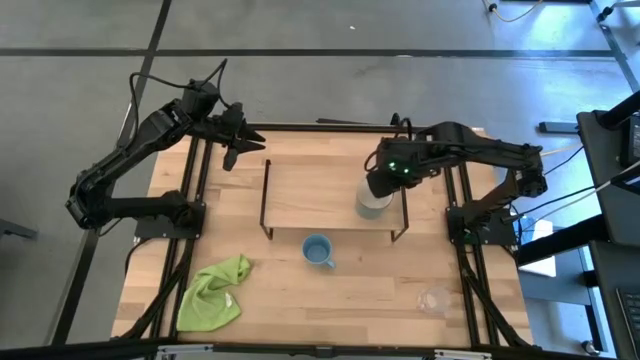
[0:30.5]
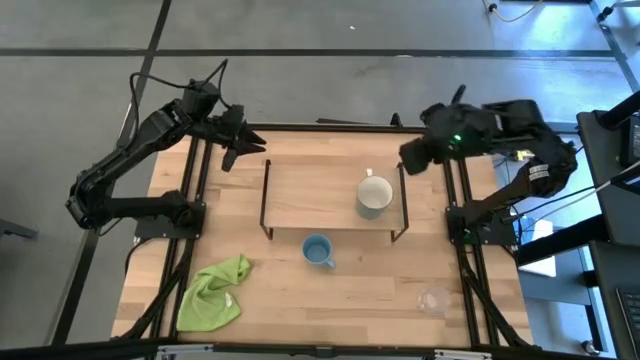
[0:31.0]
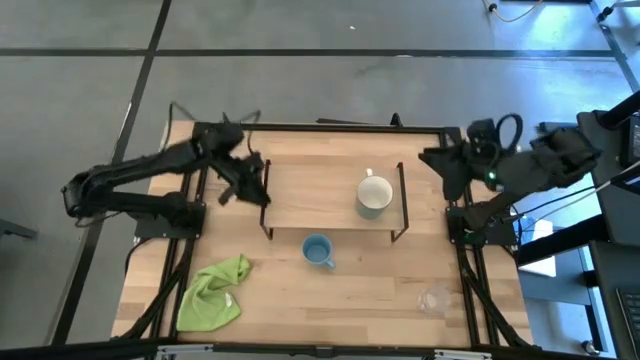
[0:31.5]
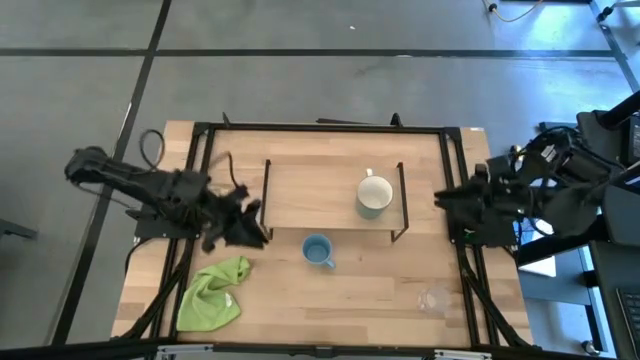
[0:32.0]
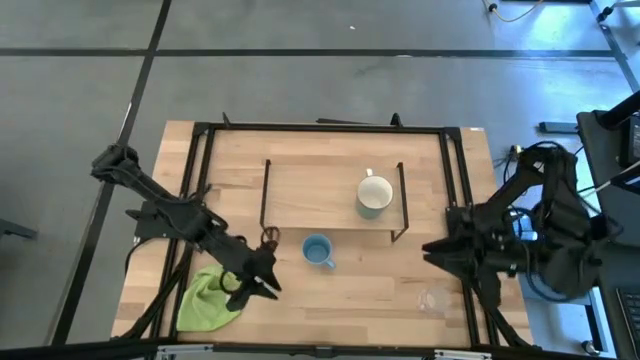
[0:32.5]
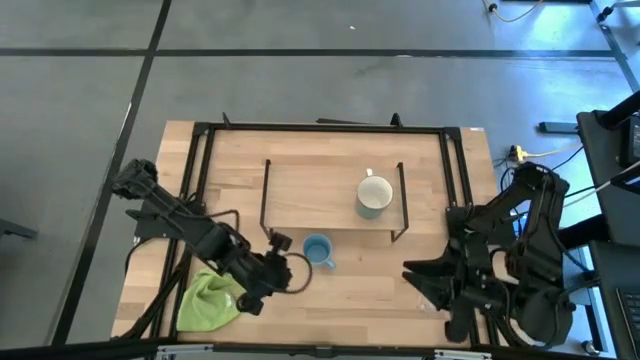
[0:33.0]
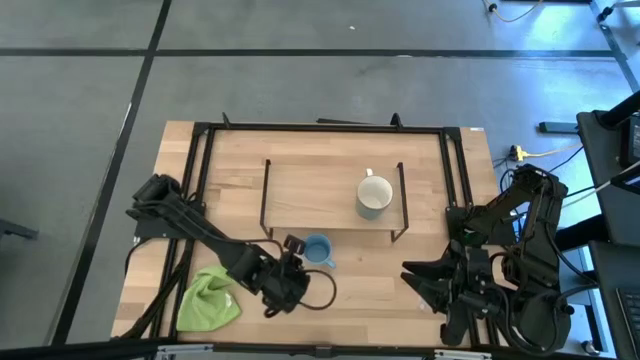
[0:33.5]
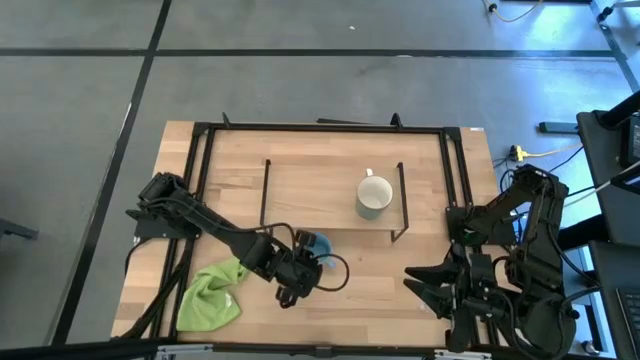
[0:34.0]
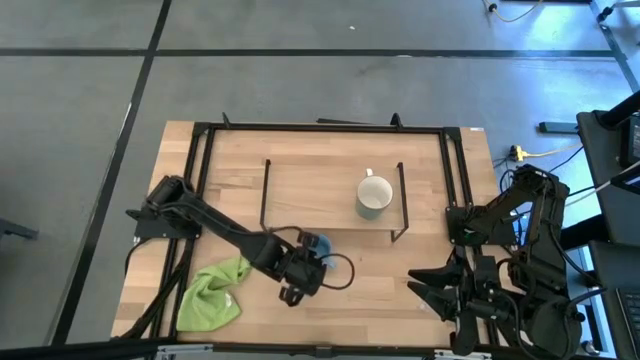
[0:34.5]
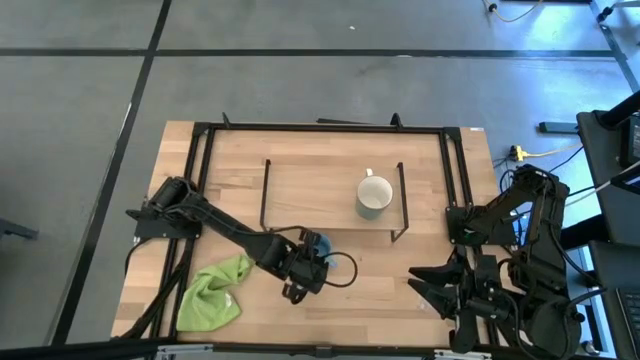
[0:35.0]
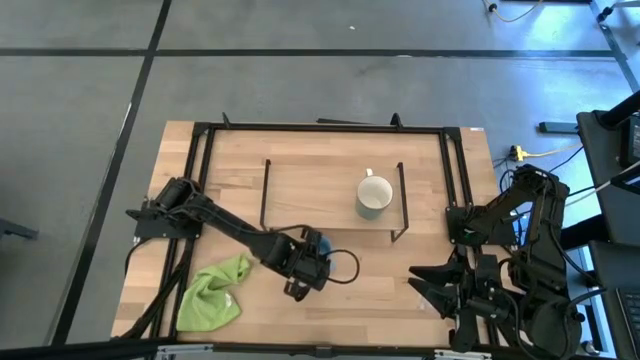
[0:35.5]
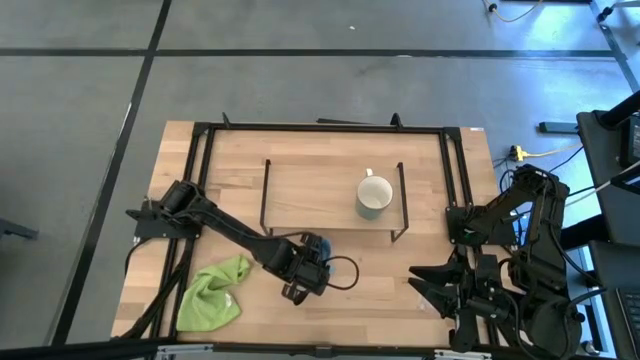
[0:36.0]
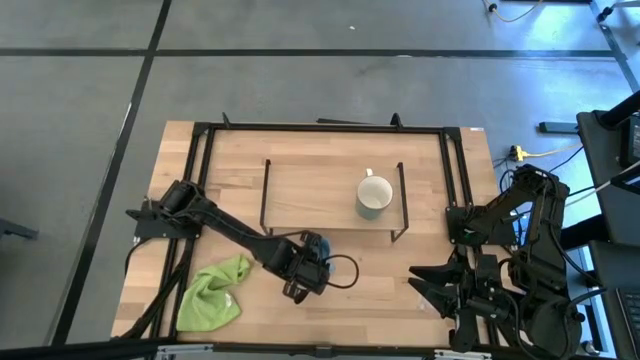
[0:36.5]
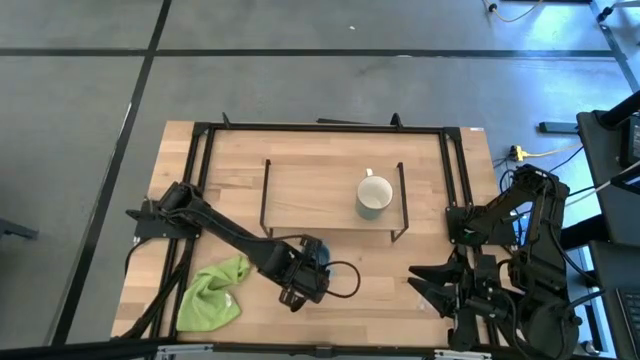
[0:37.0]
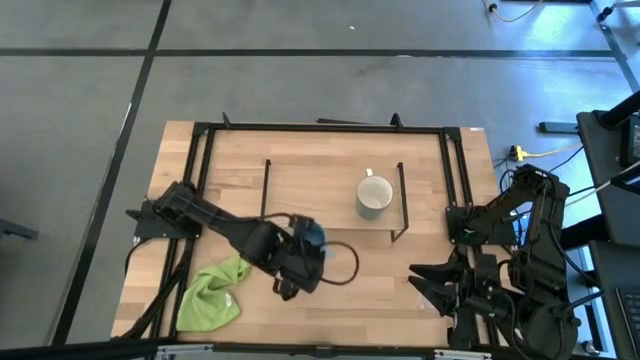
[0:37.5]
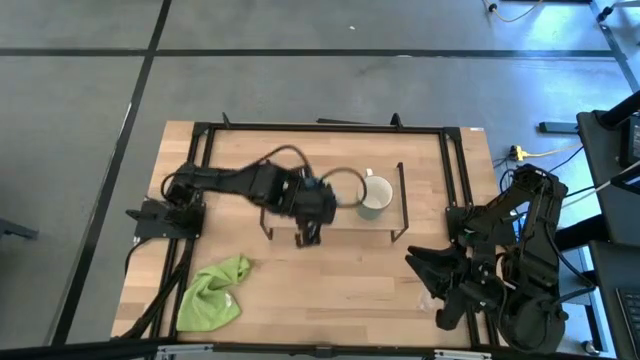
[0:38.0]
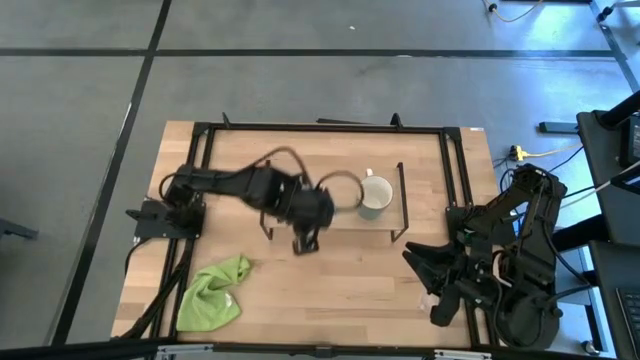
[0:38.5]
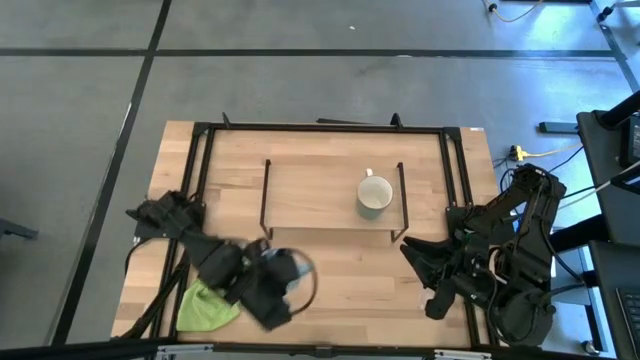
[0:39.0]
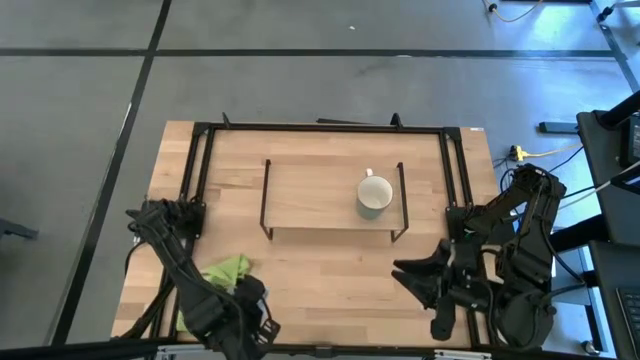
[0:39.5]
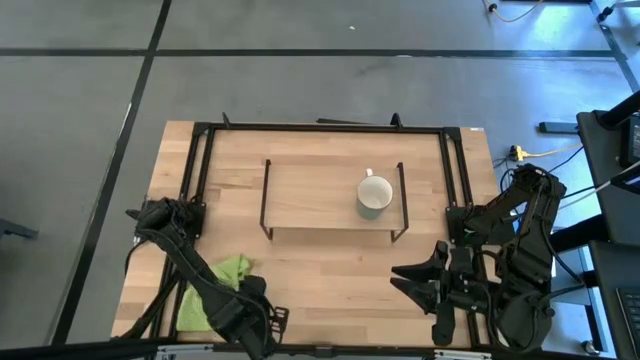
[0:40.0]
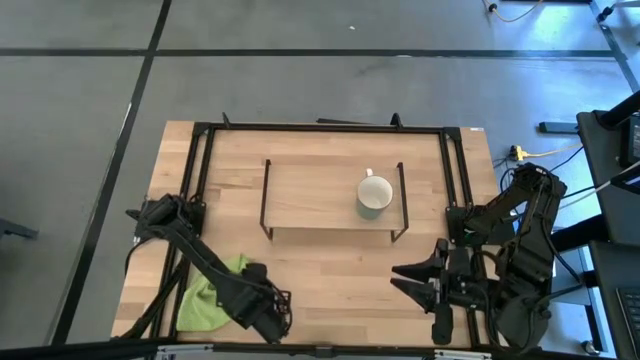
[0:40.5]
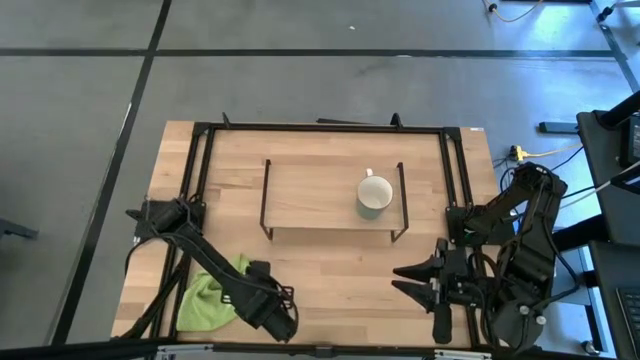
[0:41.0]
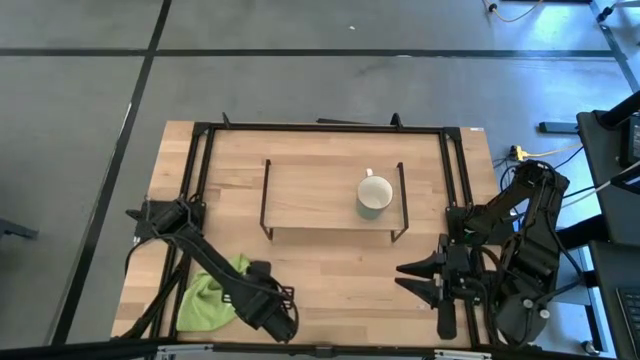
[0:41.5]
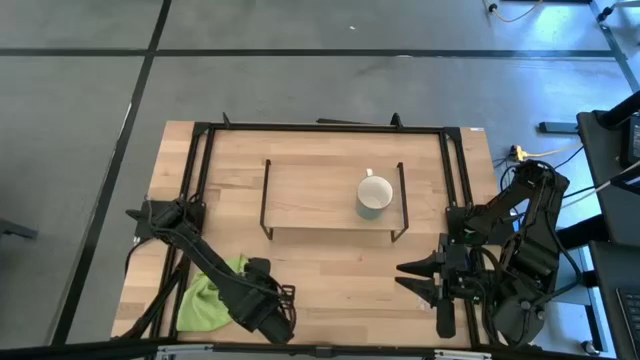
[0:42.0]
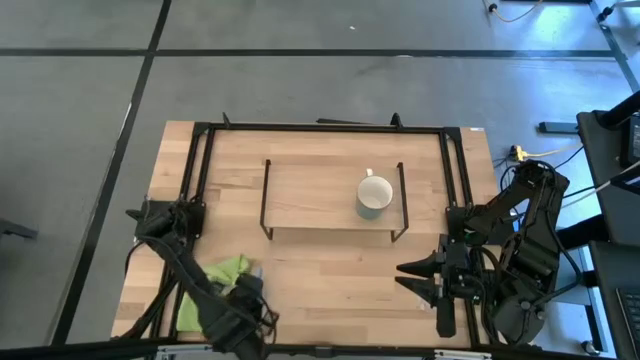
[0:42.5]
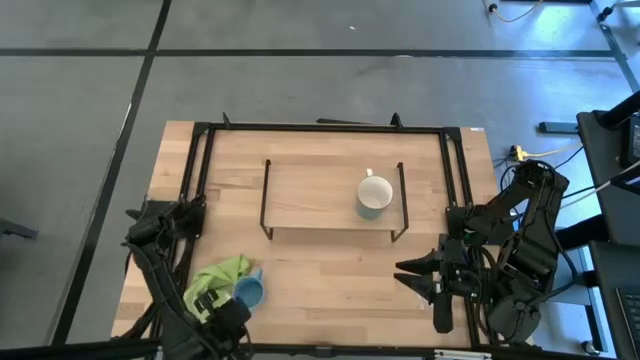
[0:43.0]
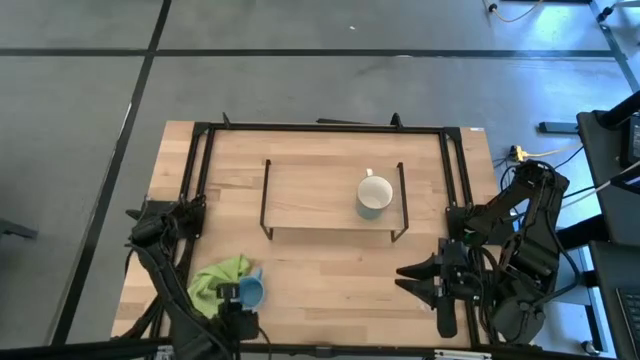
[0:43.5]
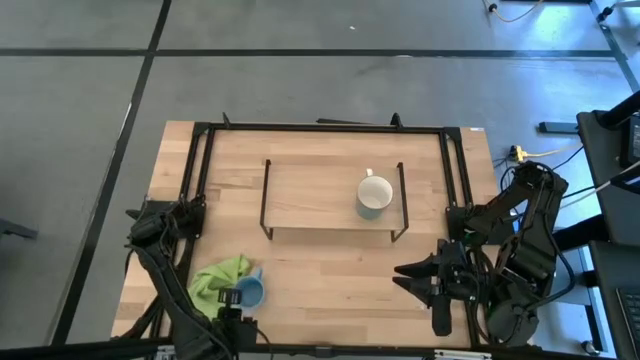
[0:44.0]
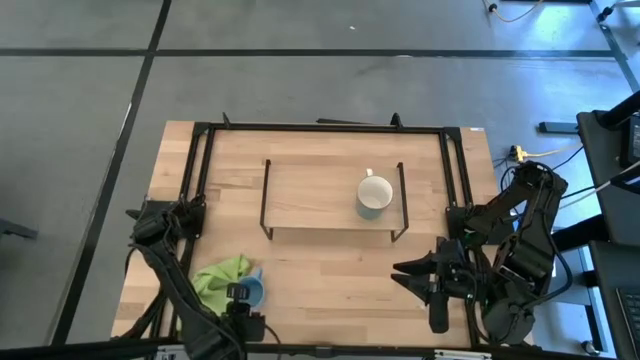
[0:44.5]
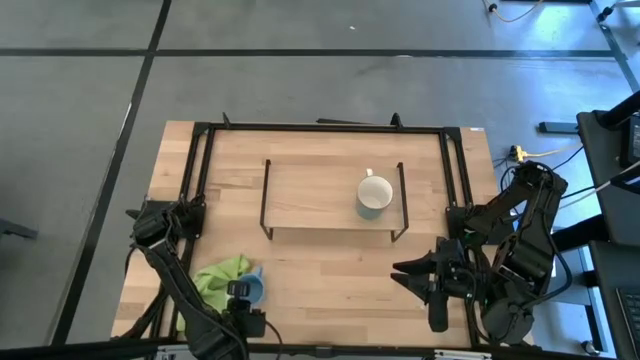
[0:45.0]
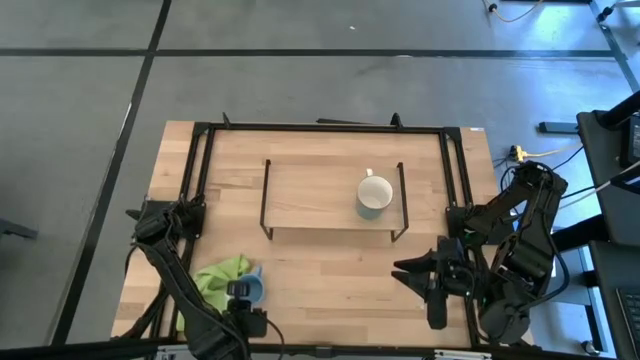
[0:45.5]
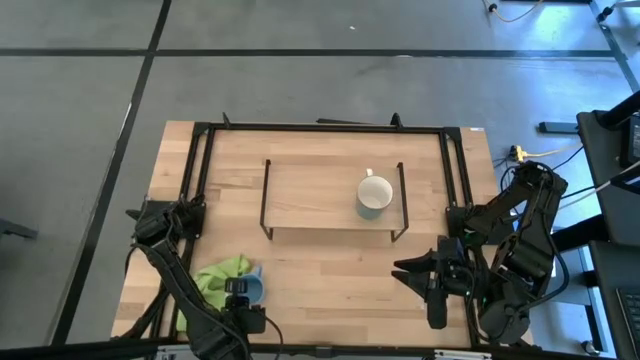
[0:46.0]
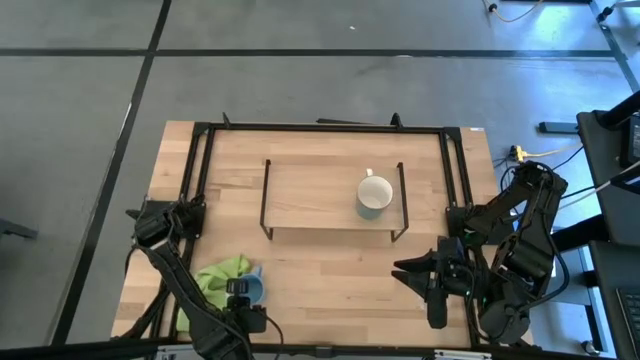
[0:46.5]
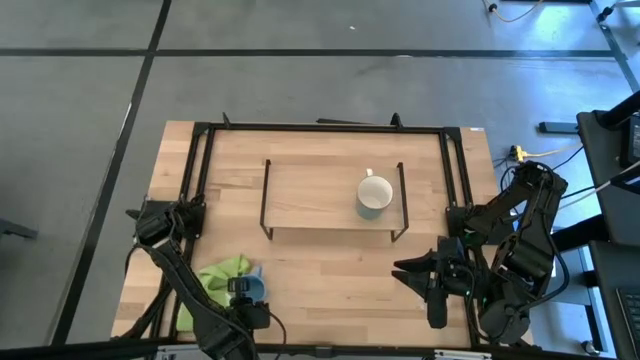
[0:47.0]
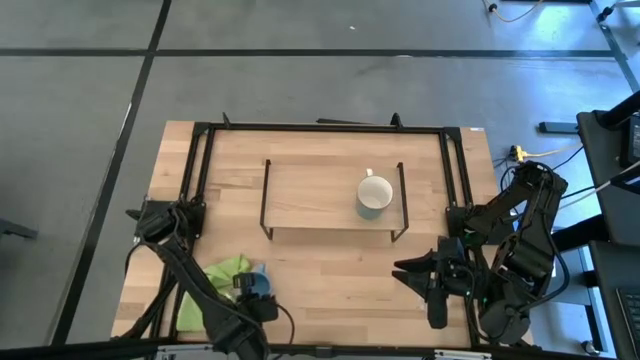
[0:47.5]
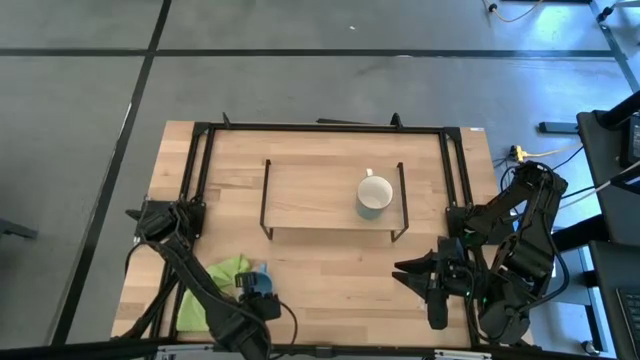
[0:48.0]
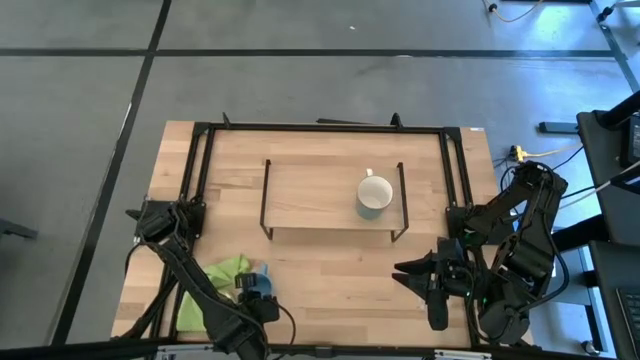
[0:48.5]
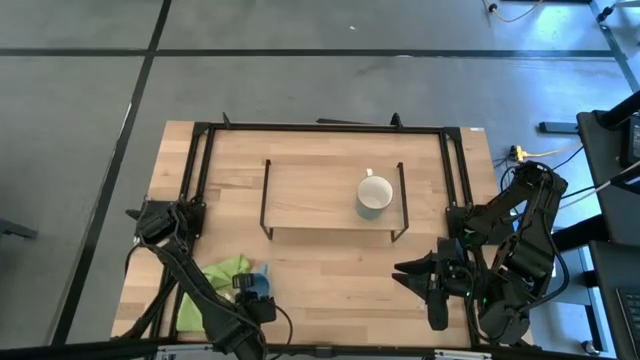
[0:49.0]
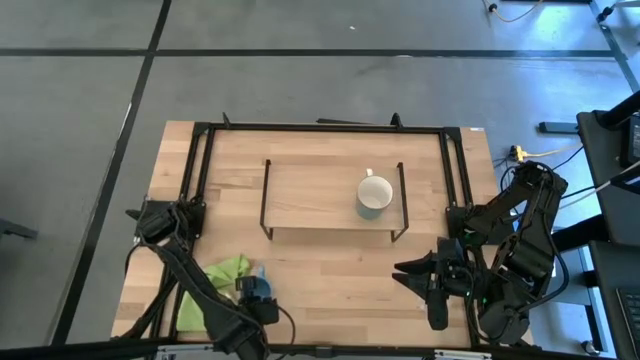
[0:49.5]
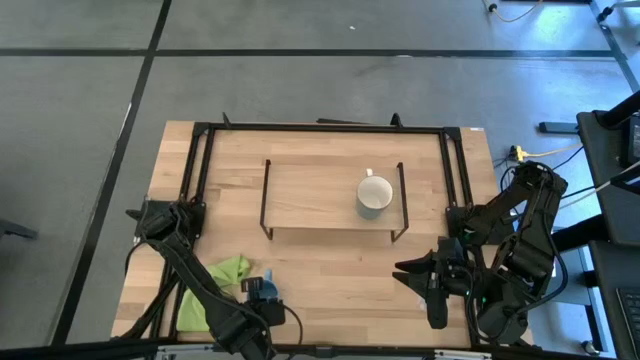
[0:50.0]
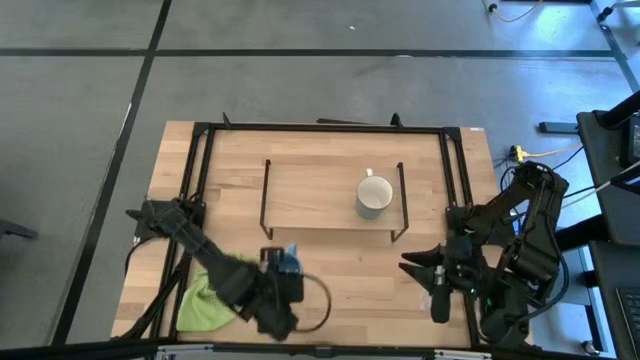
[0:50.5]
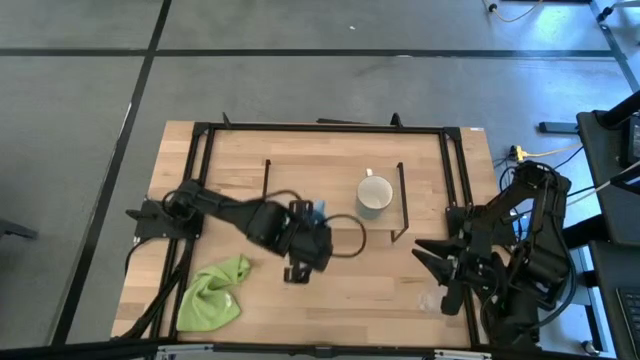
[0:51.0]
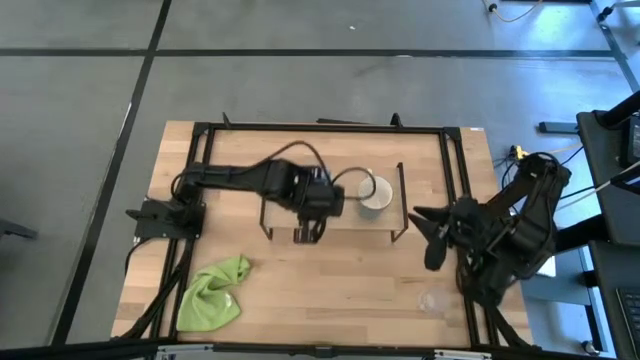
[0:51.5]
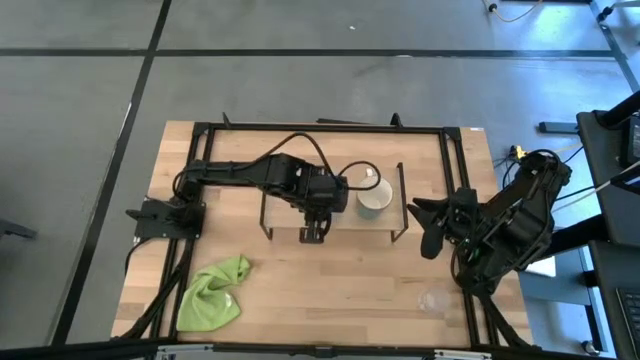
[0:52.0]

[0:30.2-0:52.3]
Task: Stack small to large cups/mugs on shelf
Put the blue mug on the shelf
